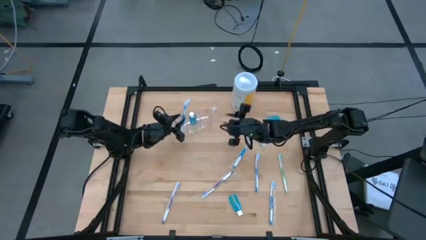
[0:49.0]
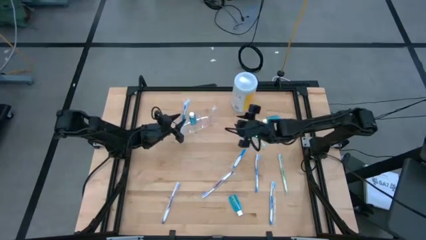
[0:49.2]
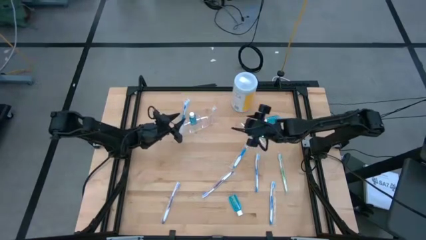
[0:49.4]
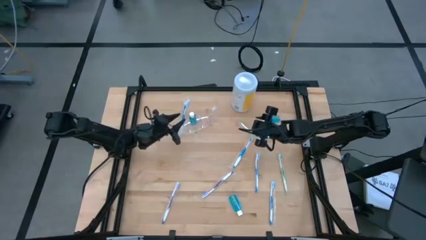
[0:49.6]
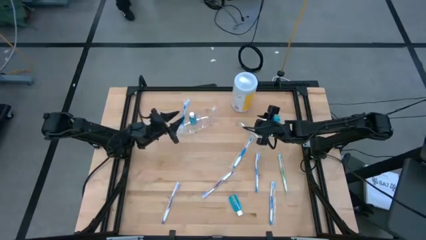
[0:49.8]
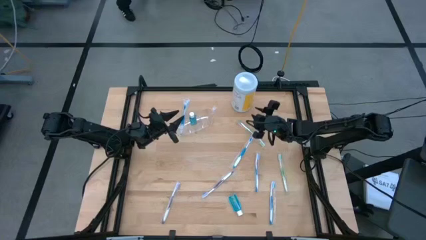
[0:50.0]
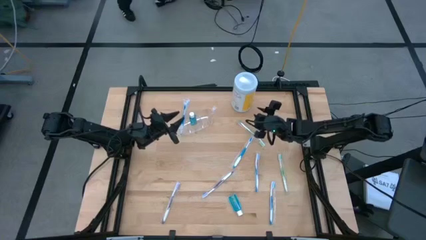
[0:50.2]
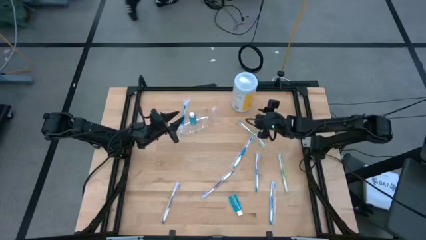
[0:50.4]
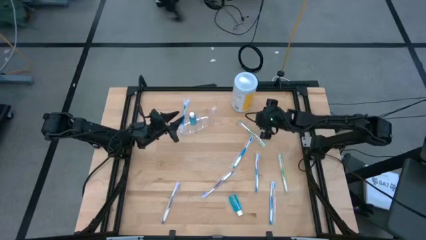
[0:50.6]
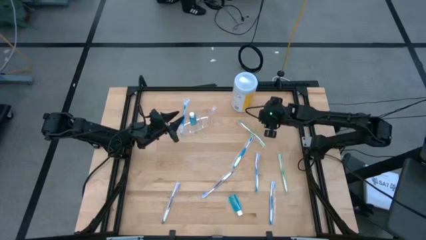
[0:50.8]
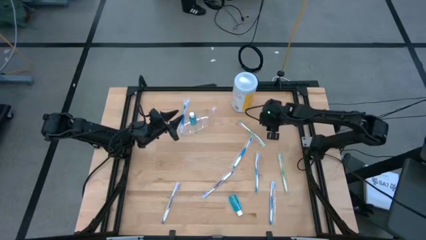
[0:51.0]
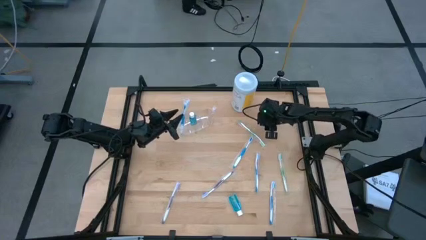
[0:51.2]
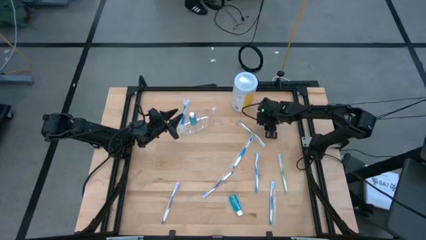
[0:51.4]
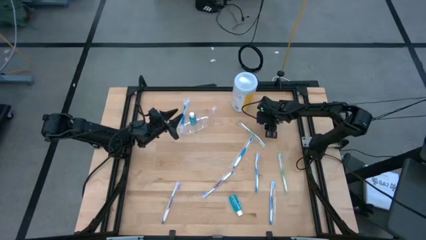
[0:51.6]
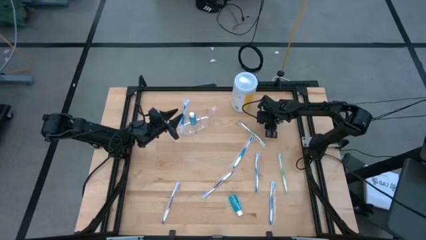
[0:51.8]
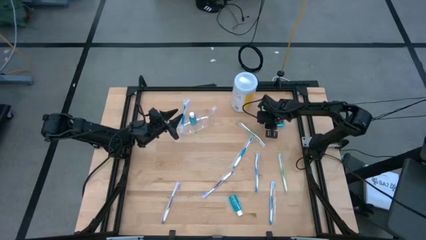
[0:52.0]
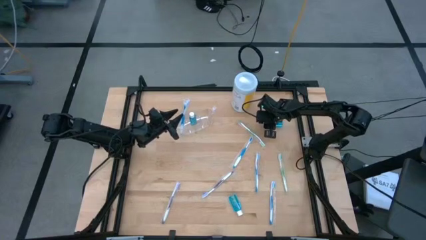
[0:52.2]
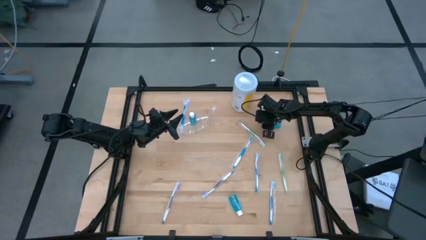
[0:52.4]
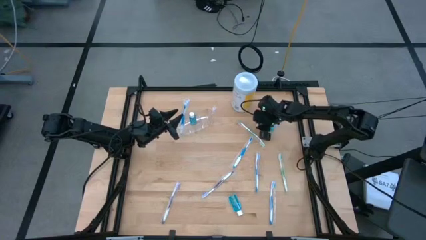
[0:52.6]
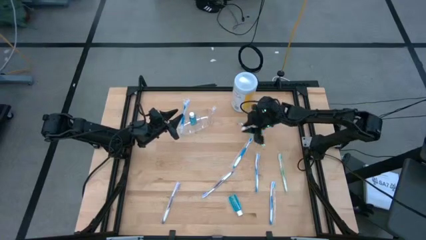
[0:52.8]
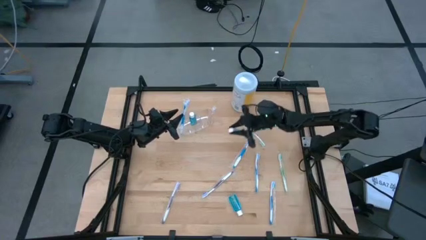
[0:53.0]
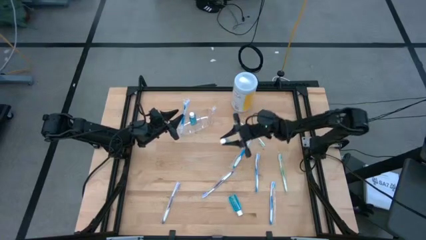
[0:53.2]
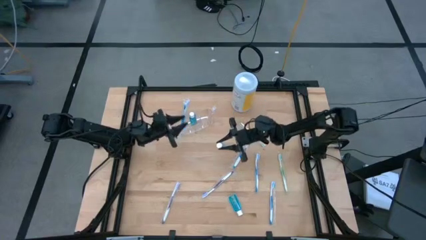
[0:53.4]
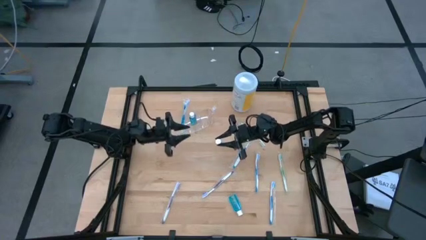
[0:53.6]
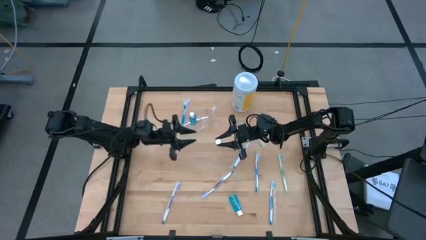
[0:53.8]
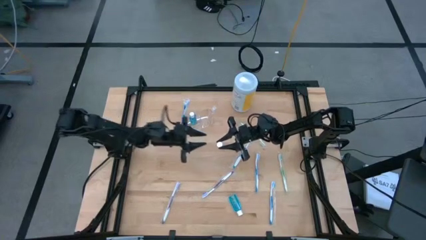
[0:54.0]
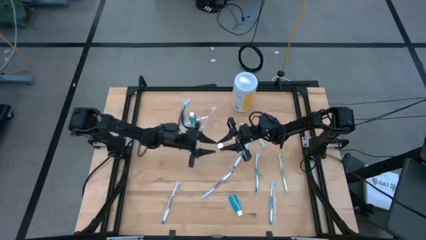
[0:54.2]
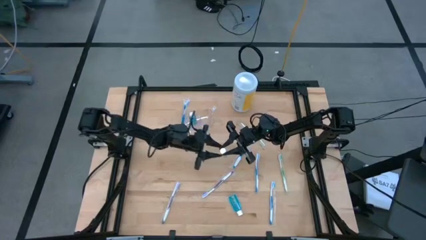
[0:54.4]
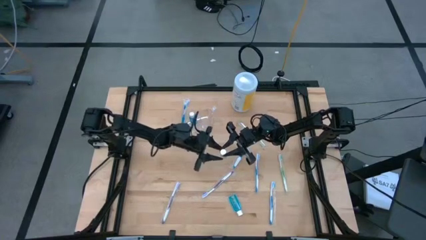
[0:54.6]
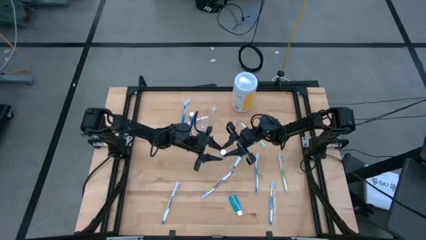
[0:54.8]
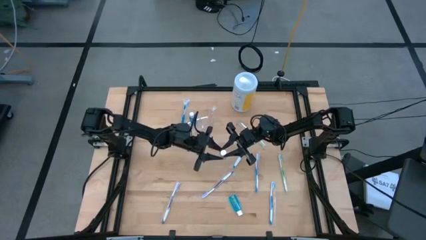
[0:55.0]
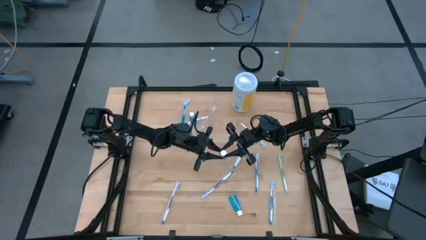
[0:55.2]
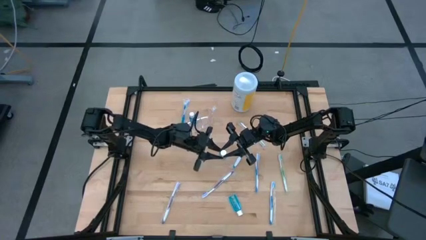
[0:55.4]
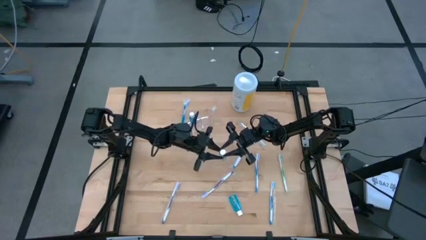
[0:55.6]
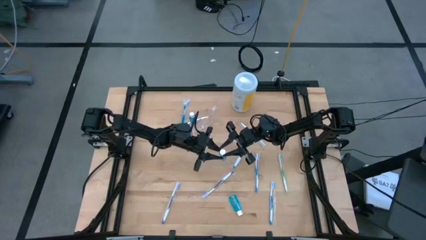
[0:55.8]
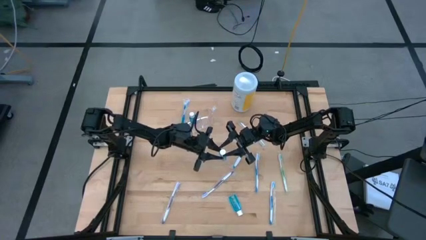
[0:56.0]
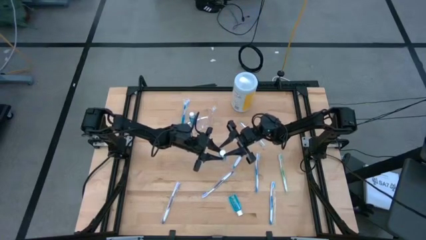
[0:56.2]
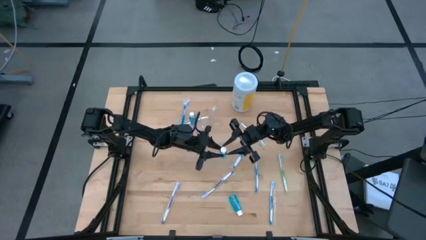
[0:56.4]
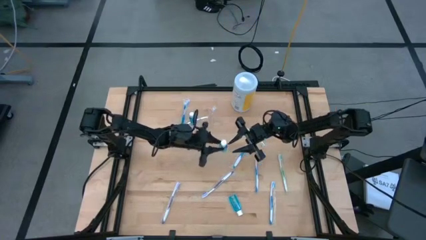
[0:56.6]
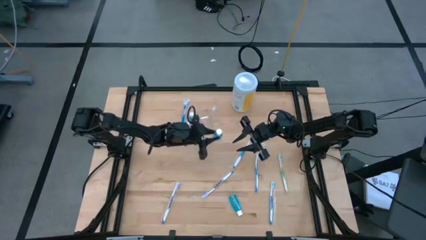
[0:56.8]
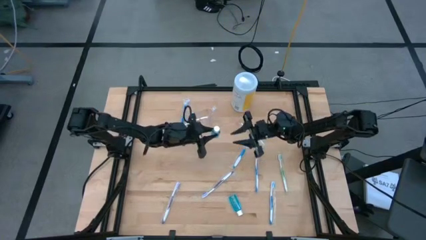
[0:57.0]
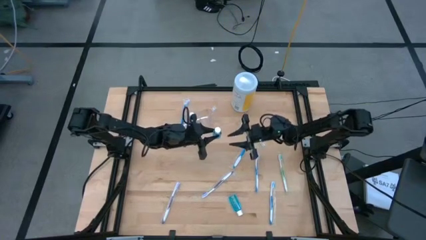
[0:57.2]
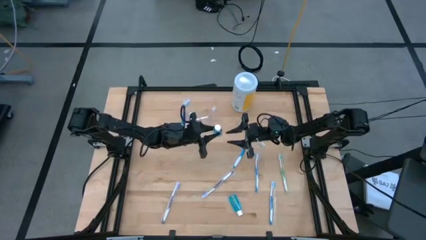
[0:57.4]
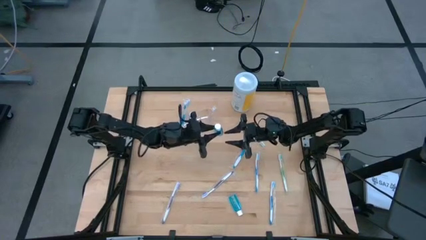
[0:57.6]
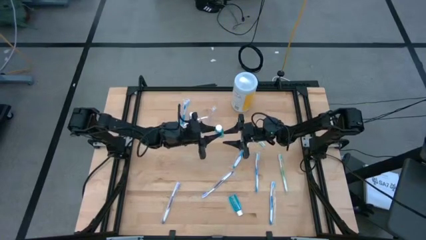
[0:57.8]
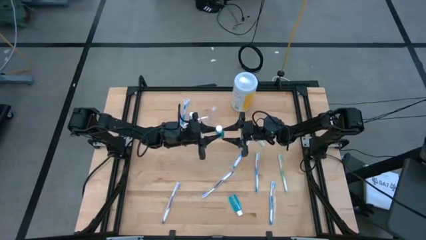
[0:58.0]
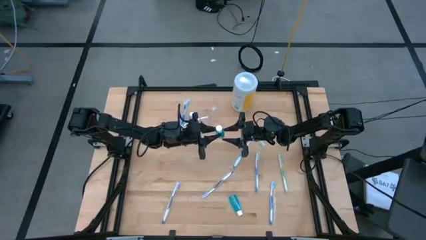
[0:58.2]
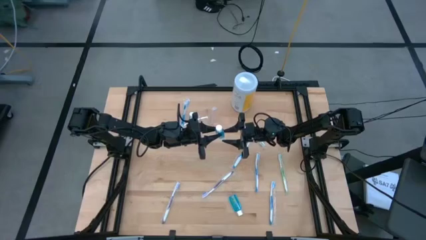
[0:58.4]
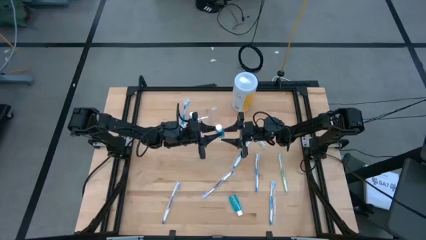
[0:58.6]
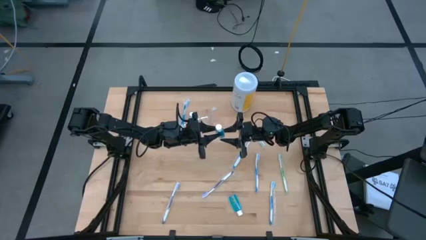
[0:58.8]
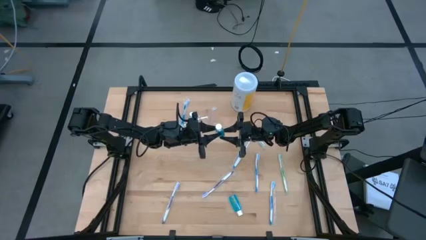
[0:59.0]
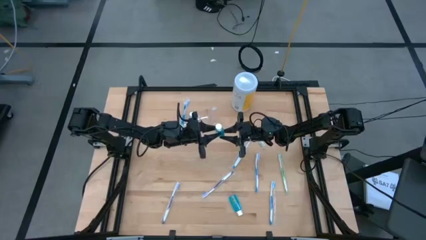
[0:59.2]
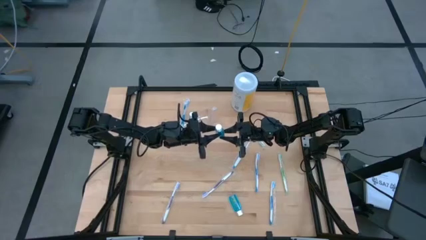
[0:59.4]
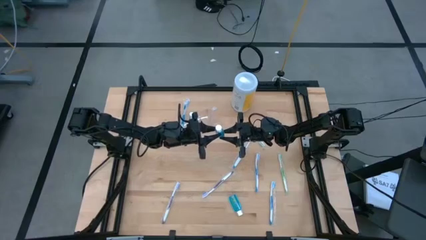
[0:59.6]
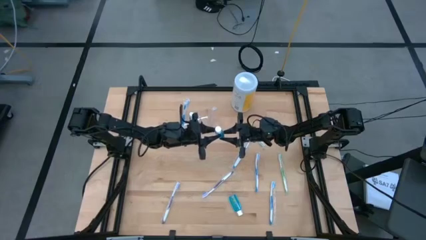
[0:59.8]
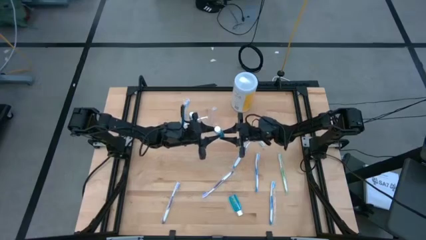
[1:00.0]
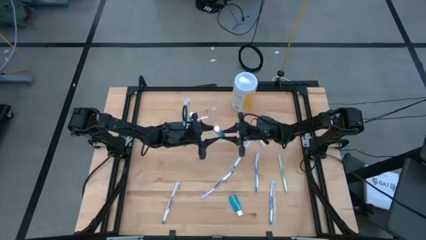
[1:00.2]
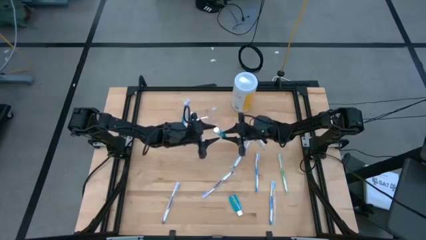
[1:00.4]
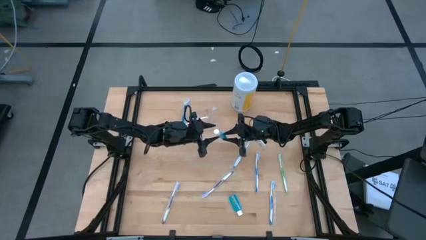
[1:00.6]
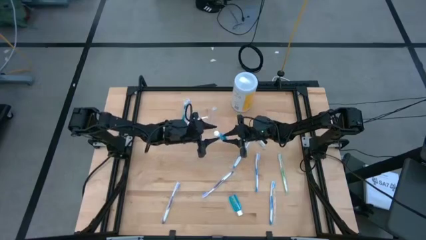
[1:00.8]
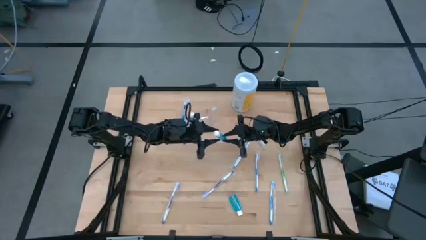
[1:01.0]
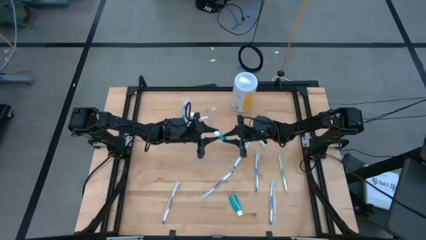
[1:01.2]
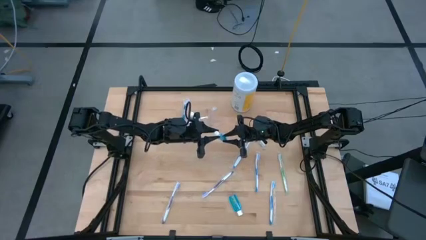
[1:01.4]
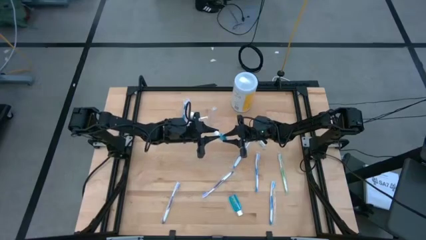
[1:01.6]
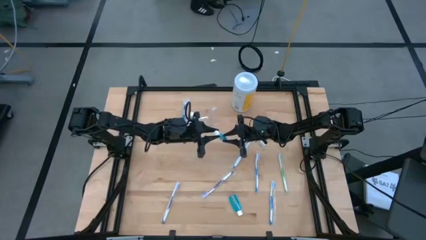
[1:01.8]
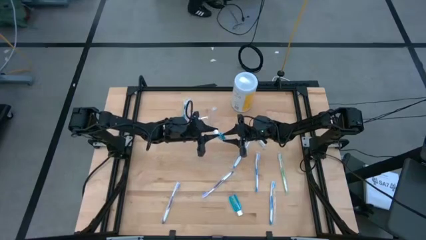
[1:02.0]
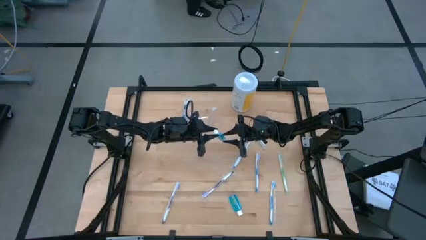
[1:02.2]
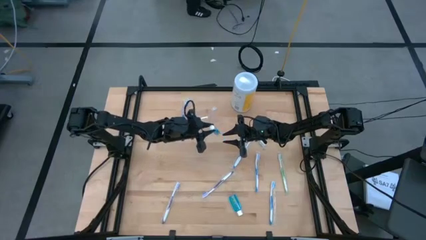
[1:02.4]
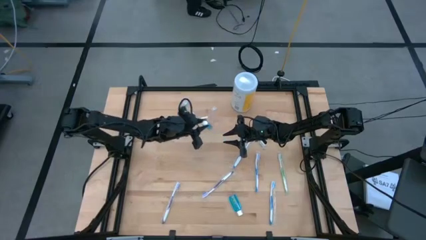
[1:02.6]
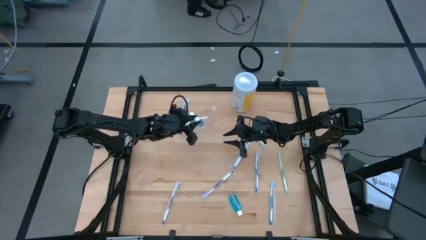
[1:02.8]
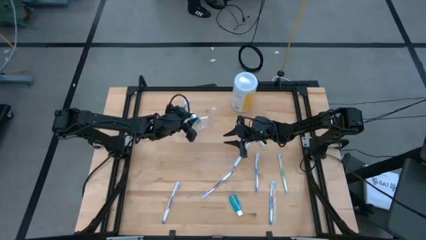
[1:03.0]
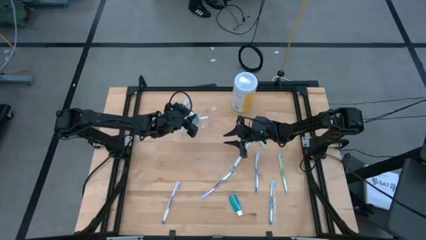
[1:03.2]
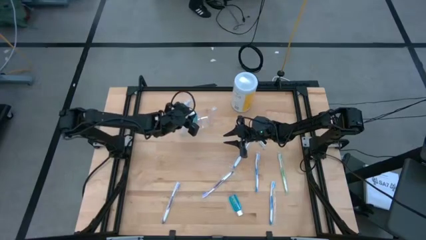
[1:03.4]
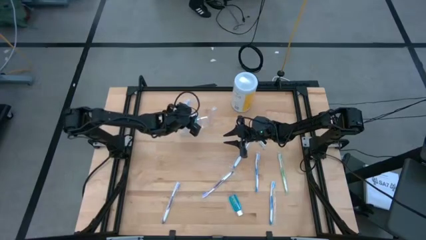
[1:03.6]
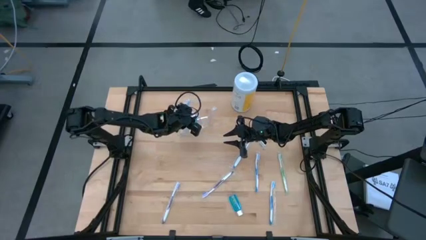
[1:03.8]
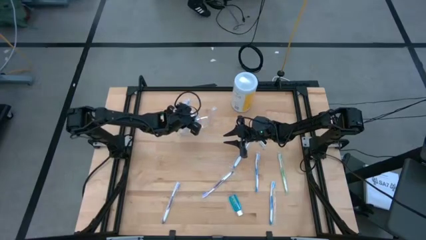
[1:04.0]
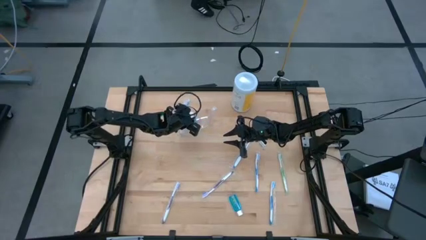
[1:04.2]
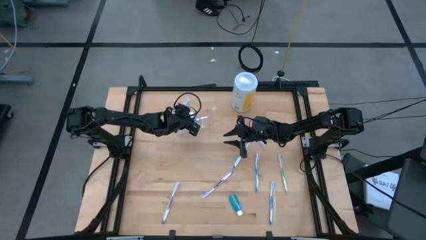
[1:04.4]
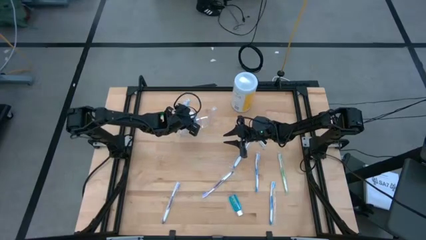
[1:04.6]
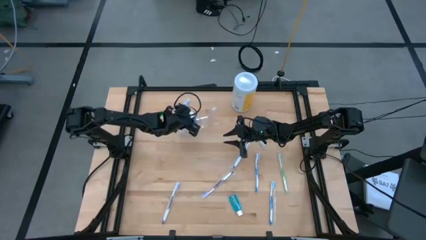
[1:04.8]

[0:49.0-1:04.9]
Task: Pick & Place toothbrushing station
Put the blue mouthwash into the transparent organizer
